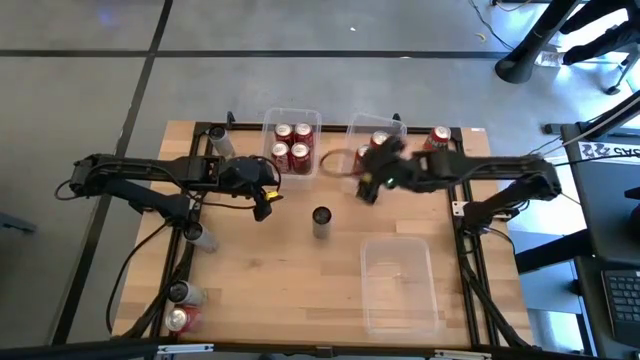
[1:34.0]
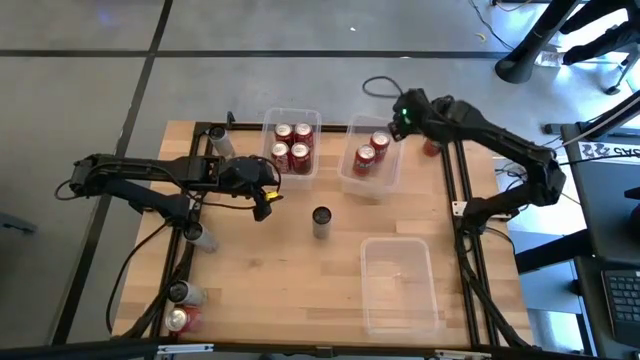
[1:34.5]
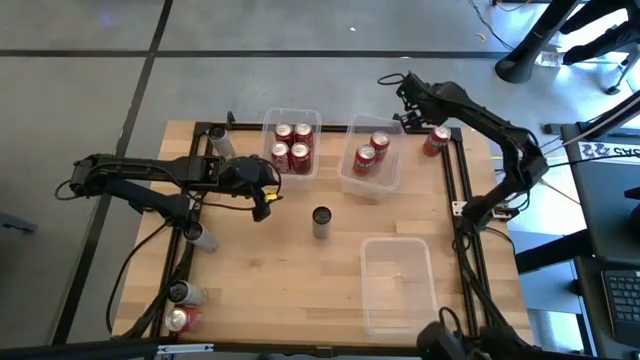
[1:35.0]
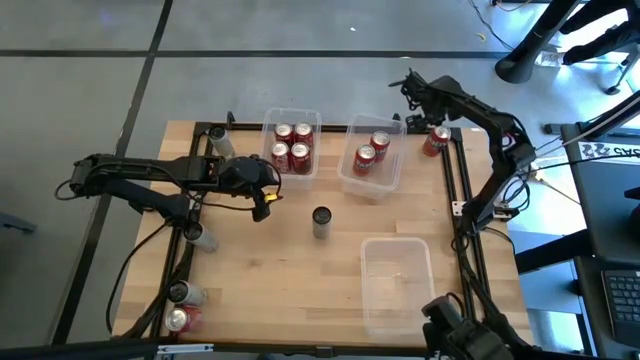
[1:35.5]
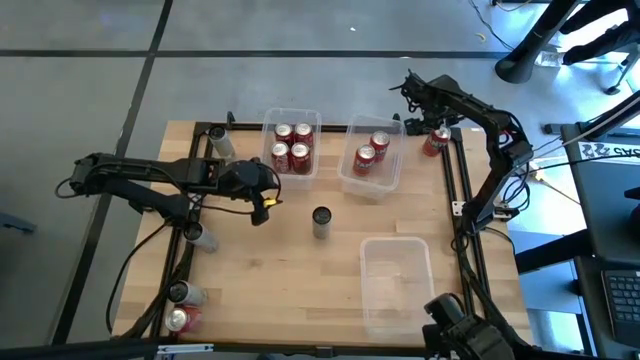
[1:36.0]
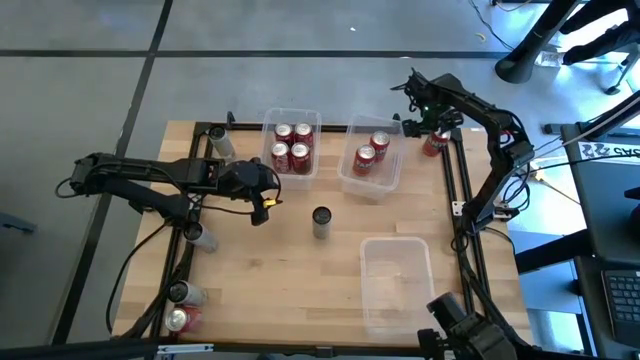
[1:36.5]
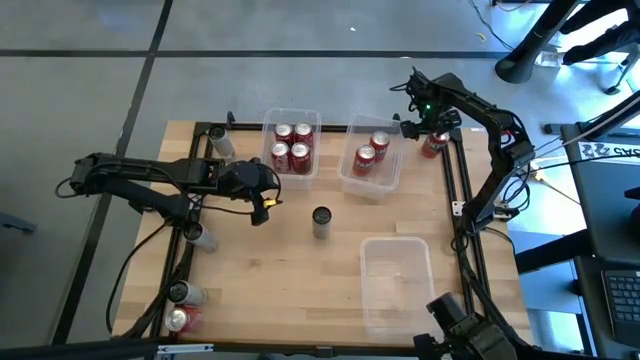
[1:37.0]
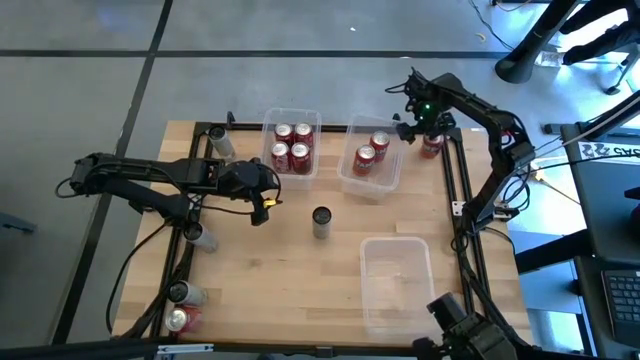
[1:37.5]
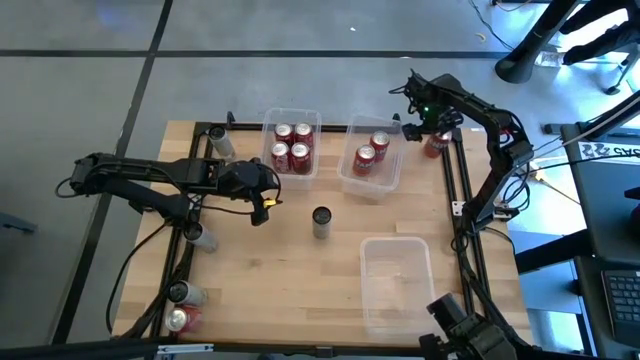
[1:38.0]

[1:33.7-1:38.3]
Task: Sort soda cans
Put the top orange soda can into the top right transparent bin aligned with the other orange soda cans

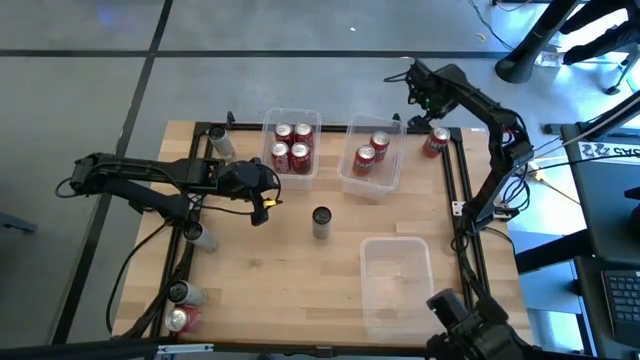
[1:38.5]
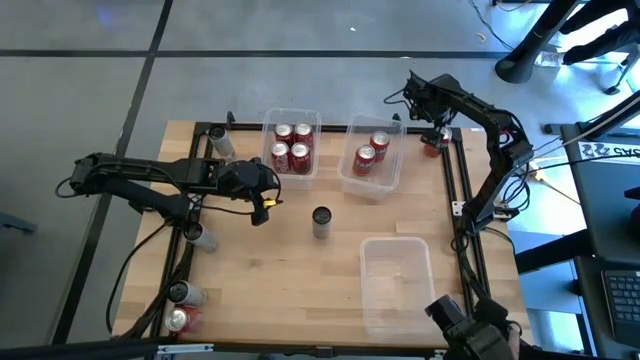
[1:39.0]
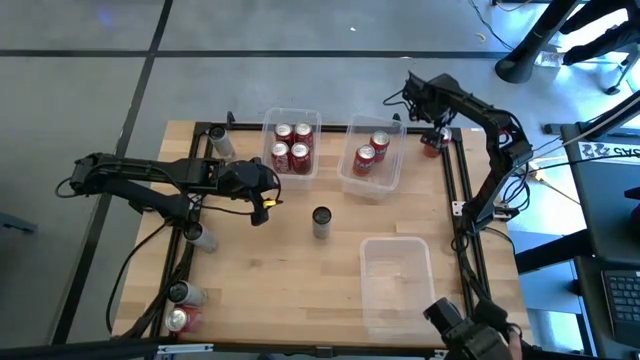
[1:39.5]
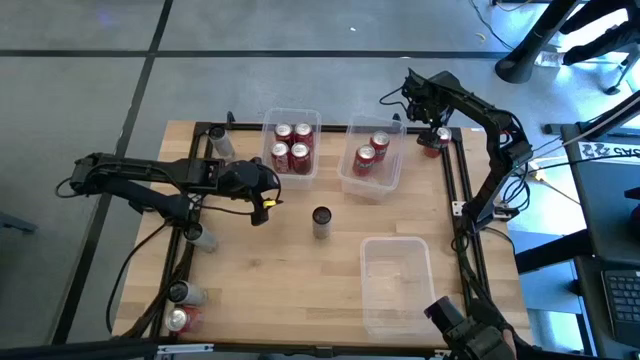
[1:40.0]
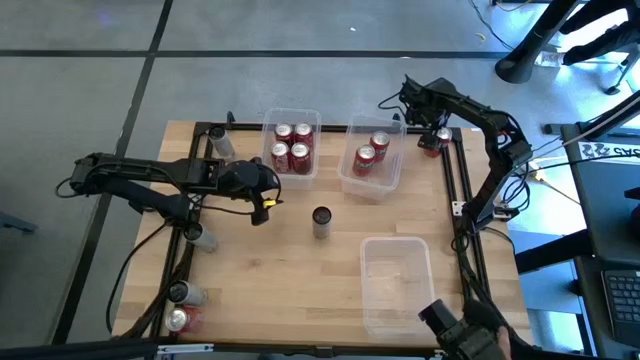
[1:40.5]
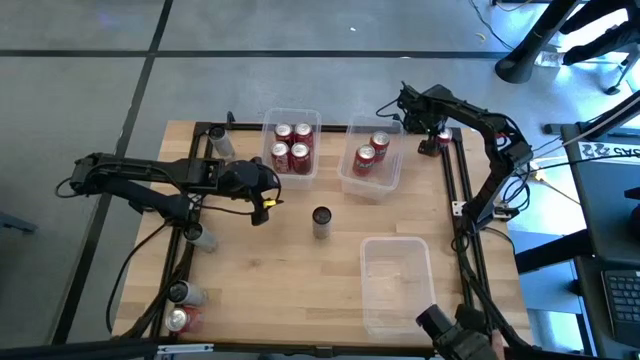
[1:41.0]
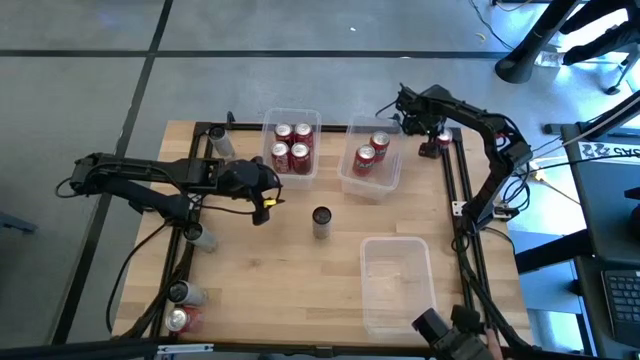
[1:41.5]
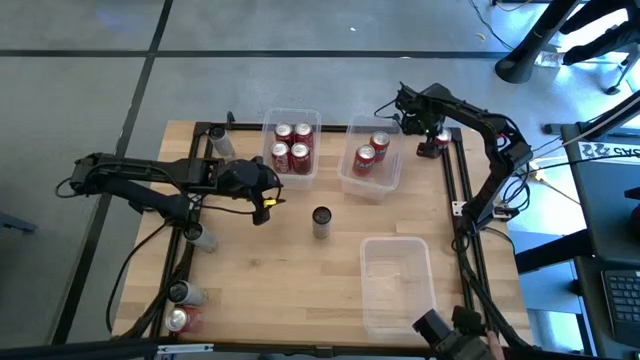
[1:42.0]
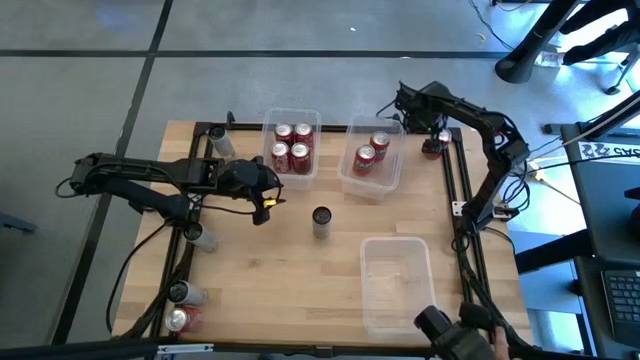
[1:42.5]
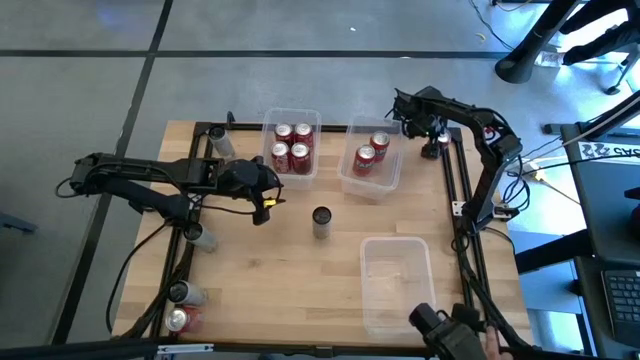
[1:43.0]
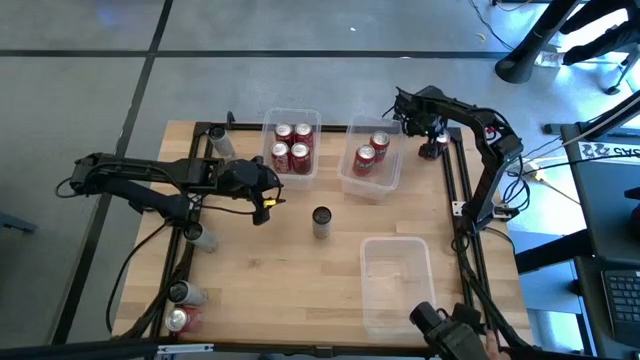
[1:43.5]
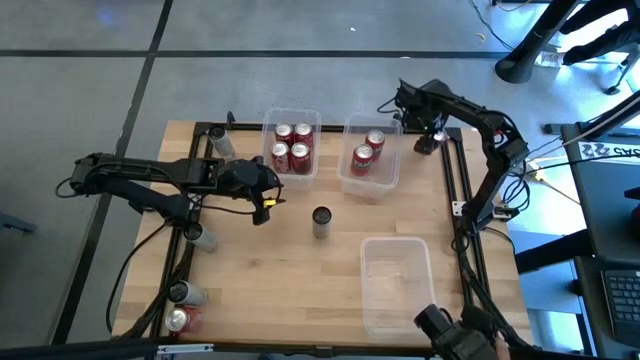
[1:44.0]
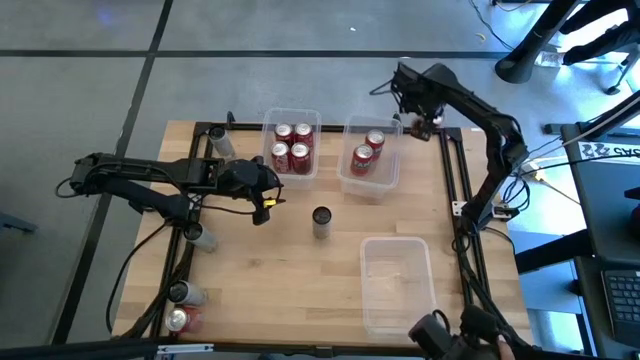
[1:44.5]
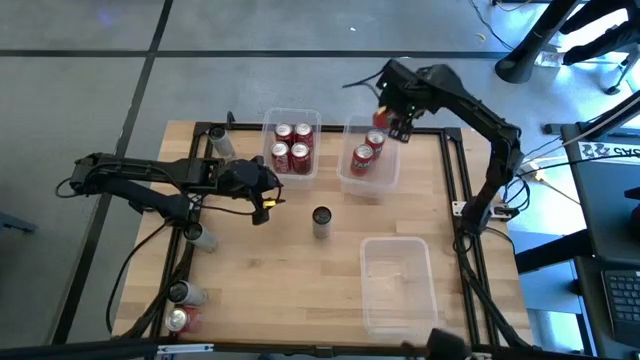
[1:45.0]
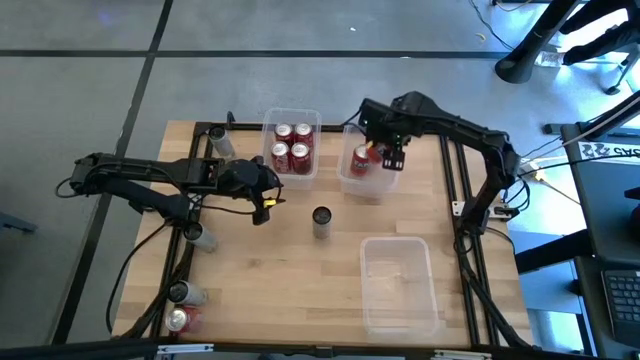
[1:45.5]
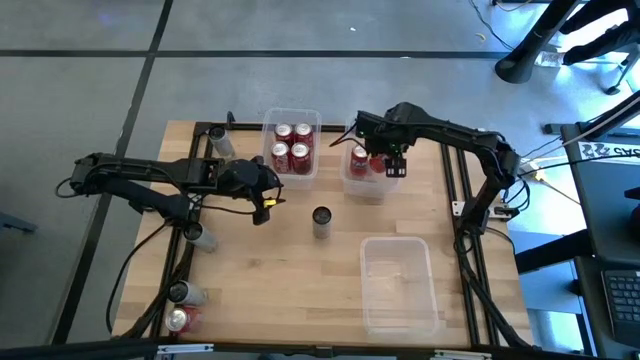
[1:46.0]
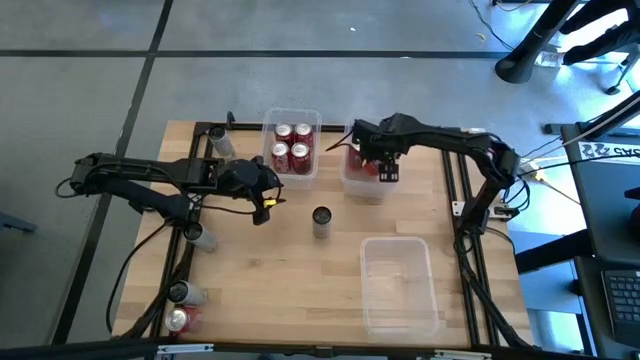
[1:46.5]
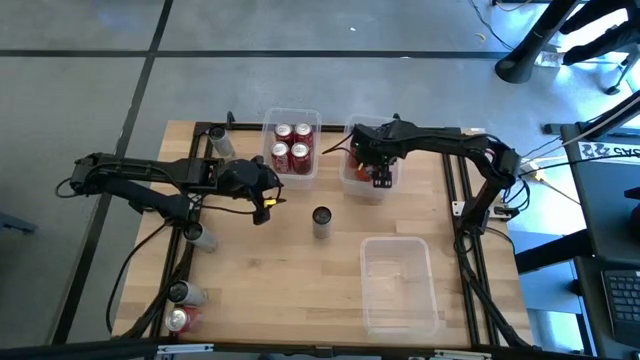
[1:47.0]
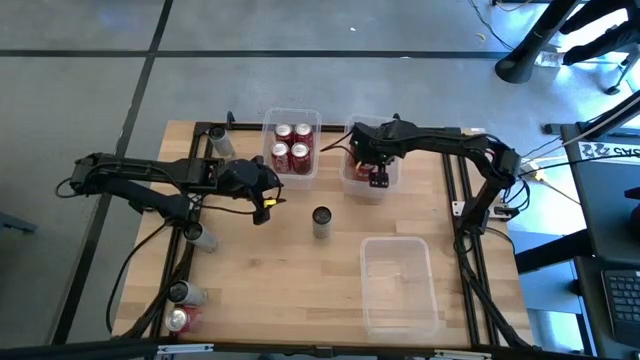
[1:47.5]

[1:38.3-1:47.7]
Put the top orange soda can into the top right transparent bin aligned with the other orange soda cans

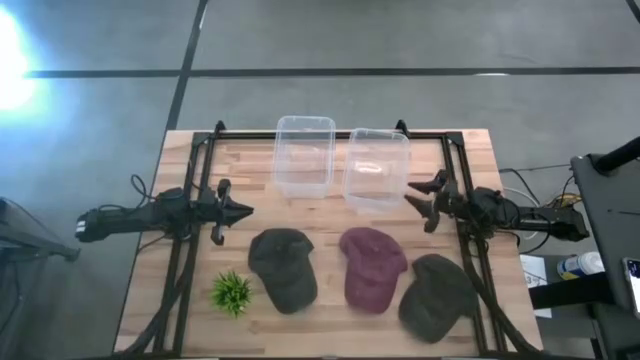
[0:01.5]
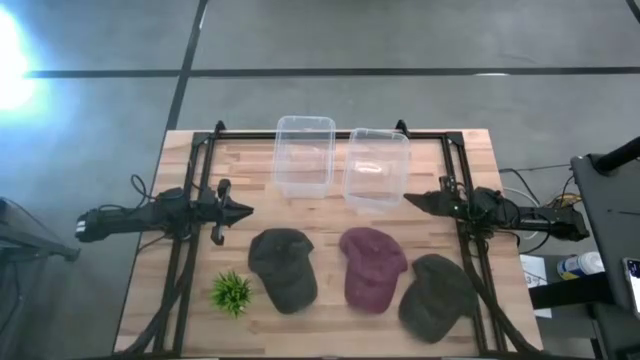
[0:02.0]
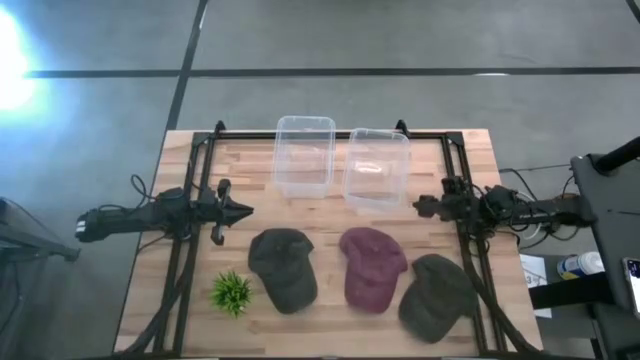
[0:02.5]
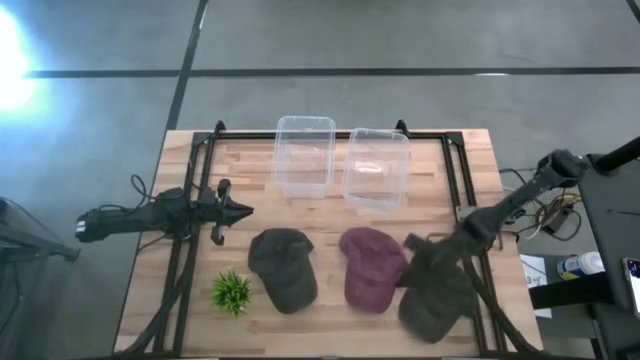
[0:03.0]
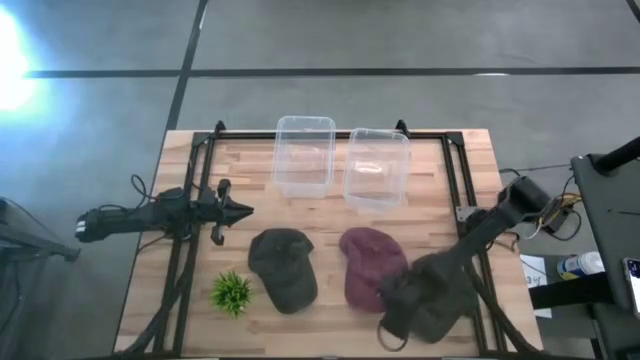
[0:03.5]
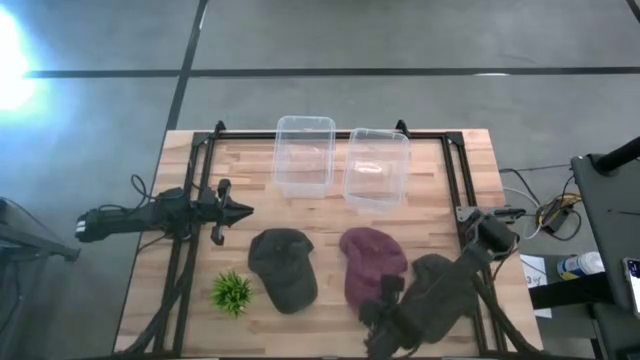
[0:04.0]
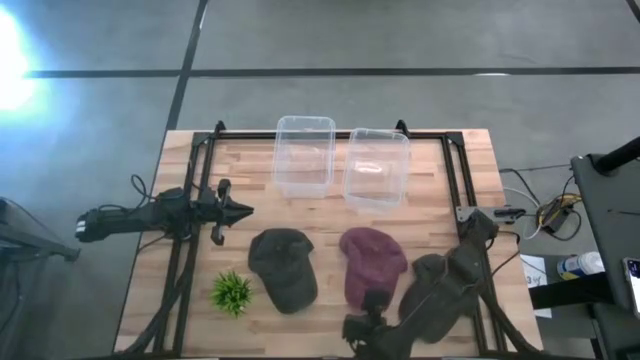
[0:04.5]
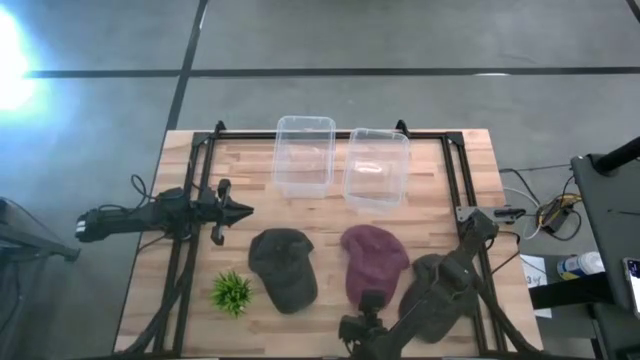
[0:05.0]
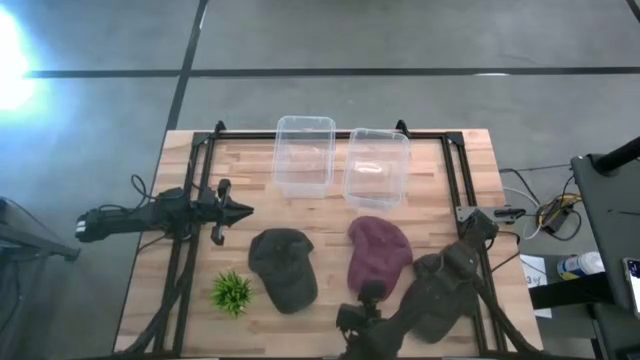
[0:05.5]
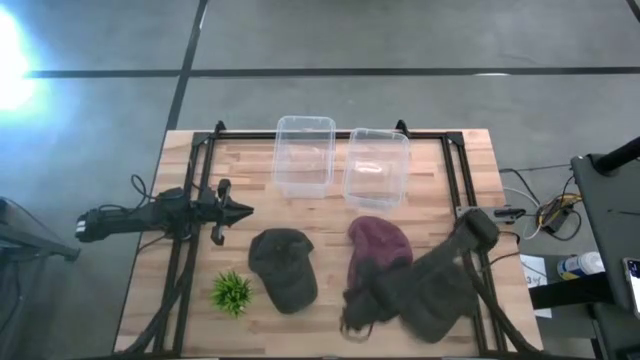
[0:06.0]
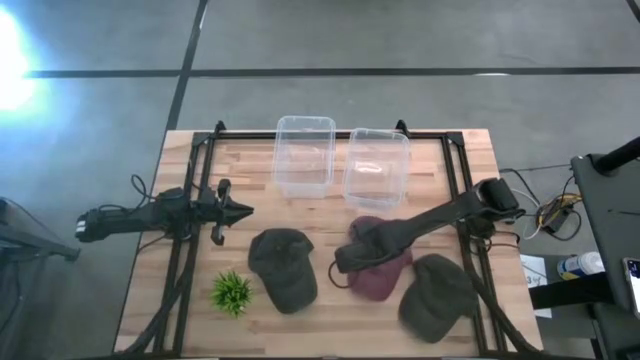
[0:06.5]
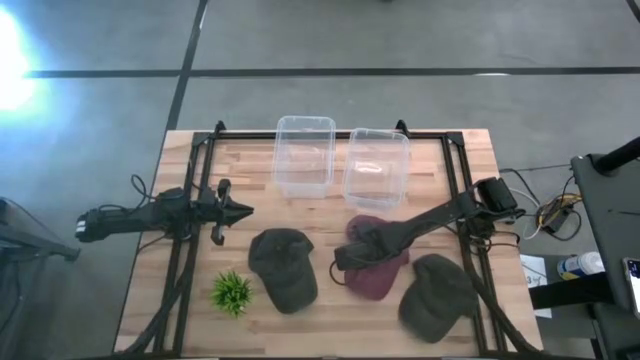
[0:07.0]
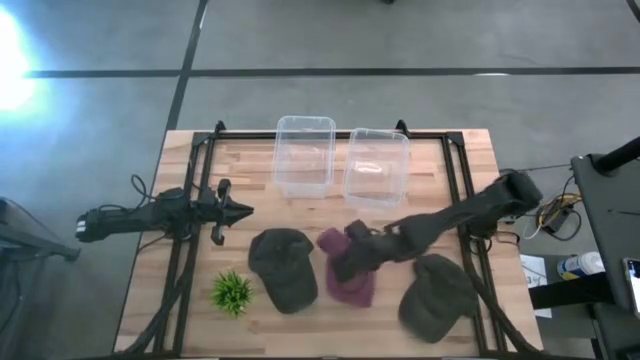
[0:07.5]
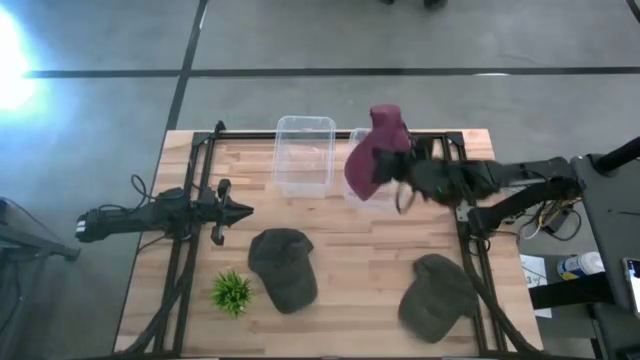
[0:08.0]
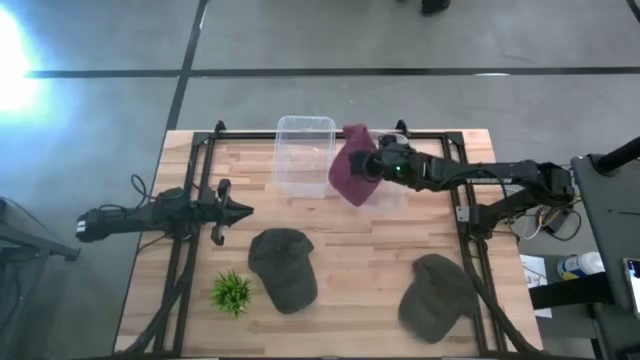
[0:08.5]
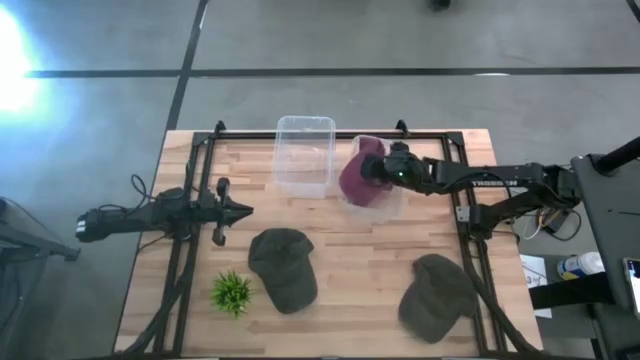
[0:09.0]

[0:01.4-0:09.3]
Task: Pick & Place hat
Put the red cap into the right transparent bin
